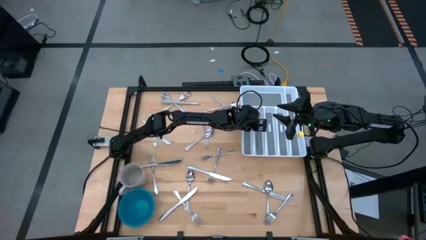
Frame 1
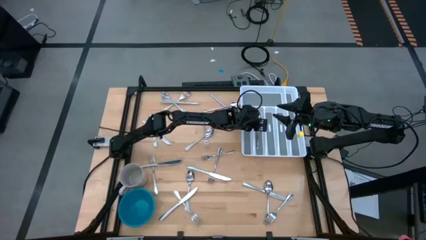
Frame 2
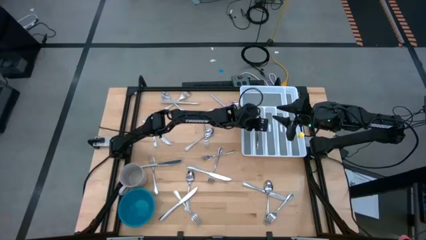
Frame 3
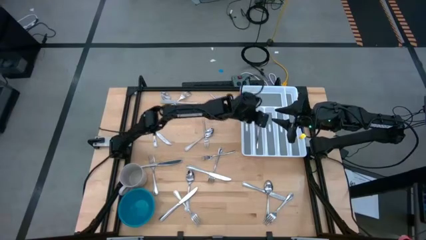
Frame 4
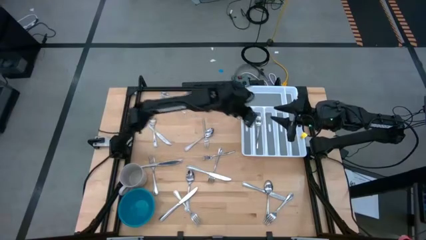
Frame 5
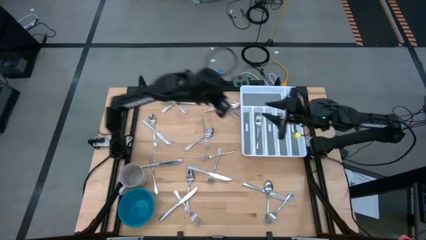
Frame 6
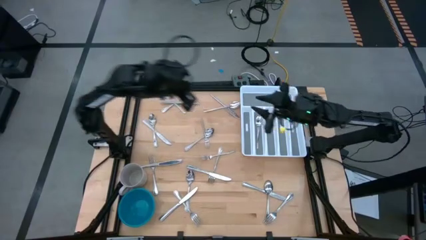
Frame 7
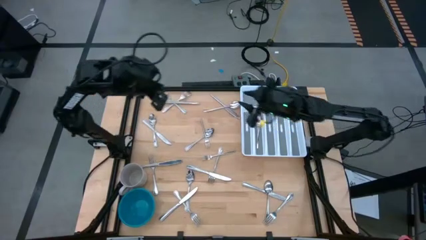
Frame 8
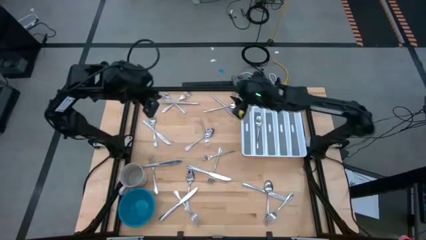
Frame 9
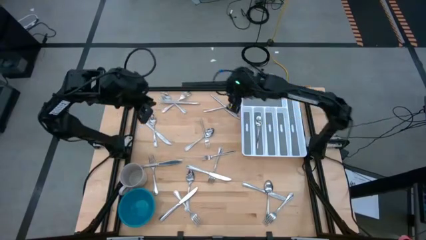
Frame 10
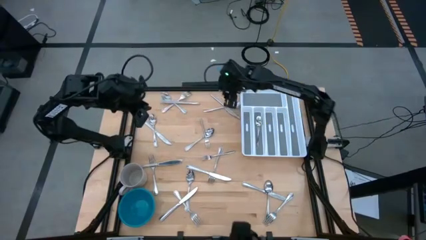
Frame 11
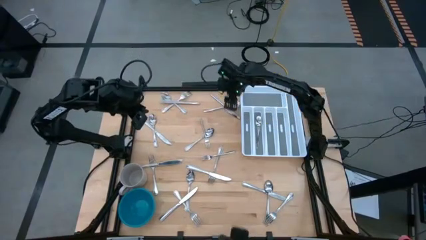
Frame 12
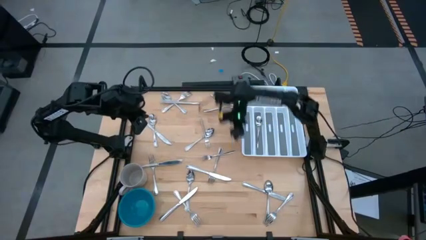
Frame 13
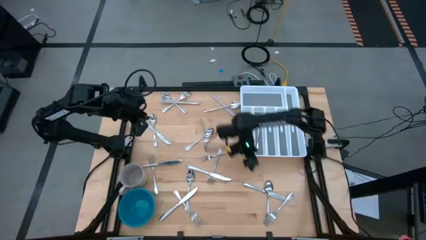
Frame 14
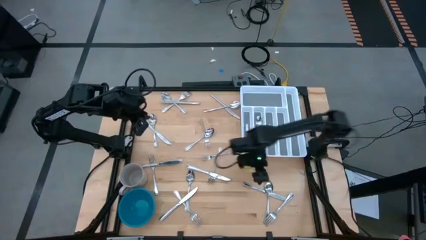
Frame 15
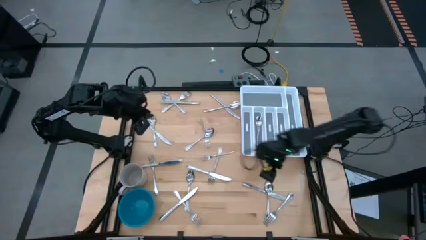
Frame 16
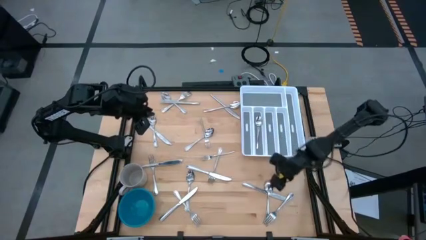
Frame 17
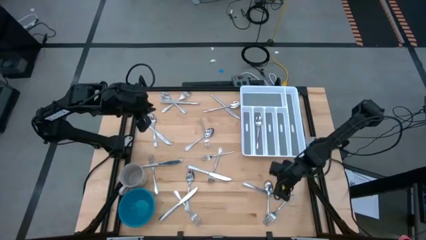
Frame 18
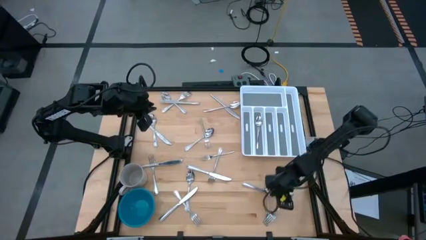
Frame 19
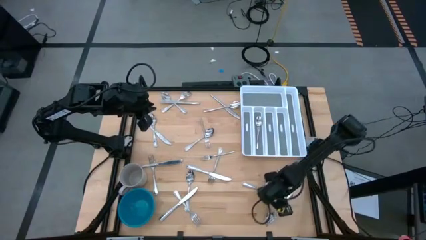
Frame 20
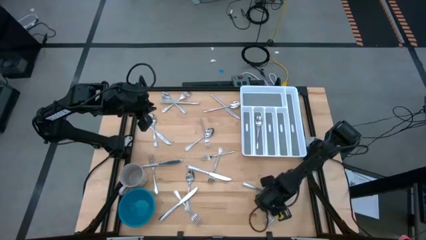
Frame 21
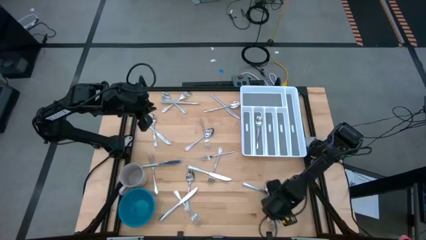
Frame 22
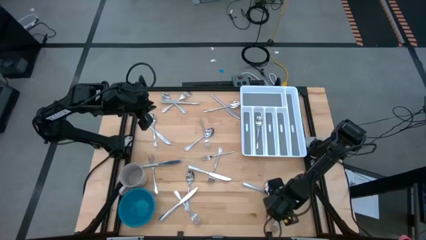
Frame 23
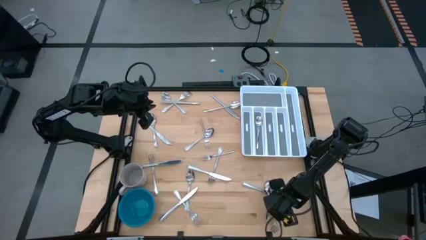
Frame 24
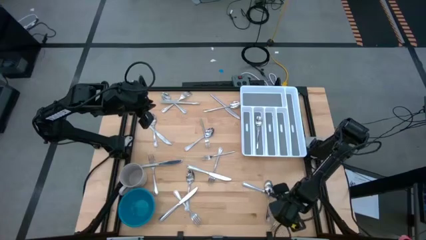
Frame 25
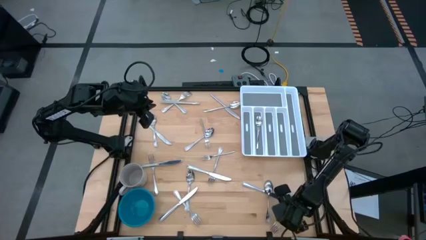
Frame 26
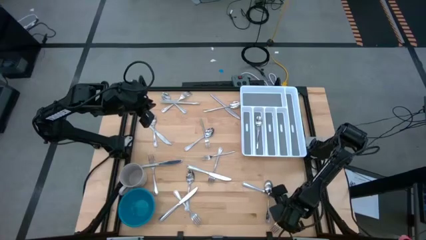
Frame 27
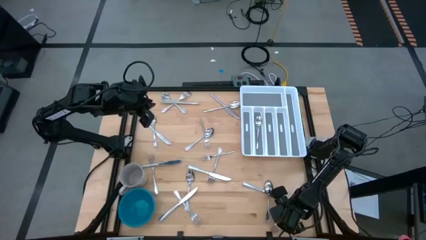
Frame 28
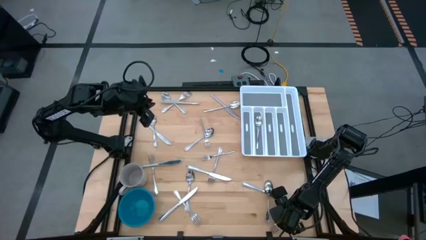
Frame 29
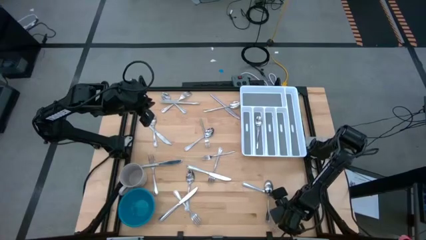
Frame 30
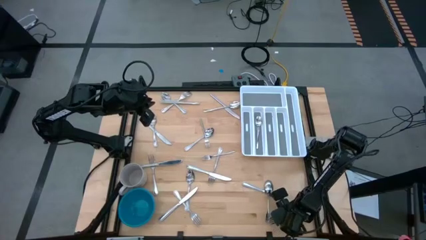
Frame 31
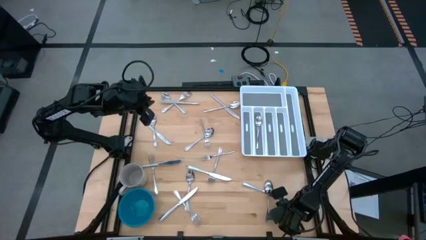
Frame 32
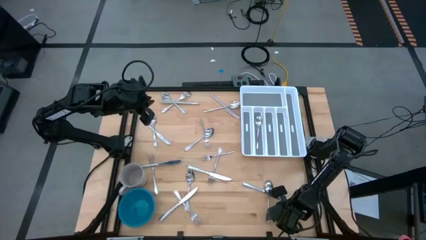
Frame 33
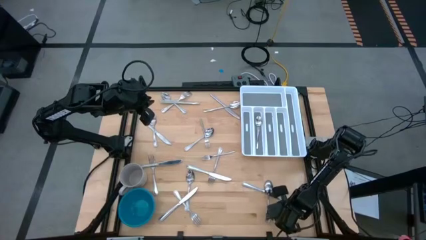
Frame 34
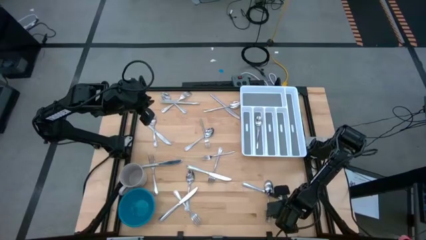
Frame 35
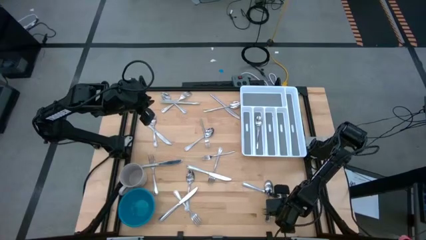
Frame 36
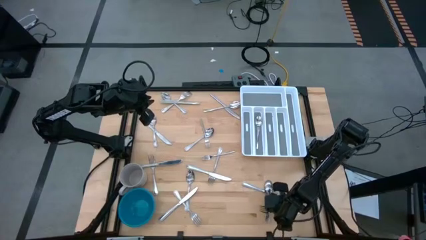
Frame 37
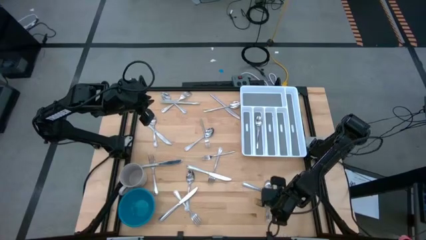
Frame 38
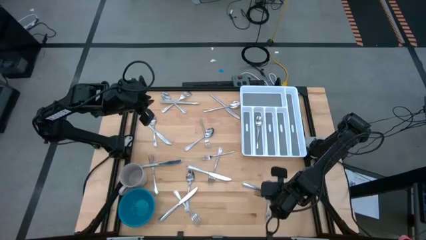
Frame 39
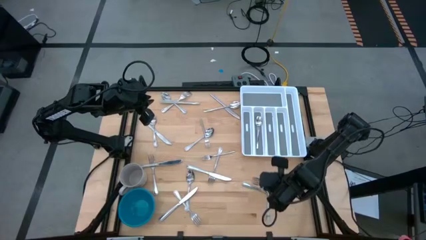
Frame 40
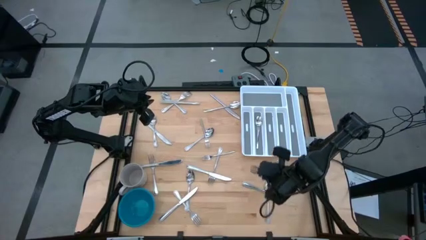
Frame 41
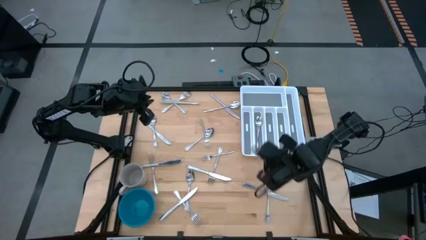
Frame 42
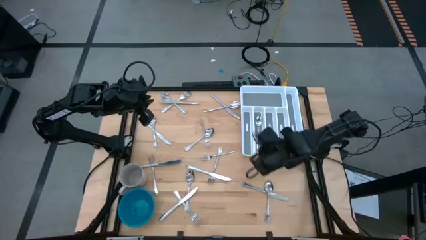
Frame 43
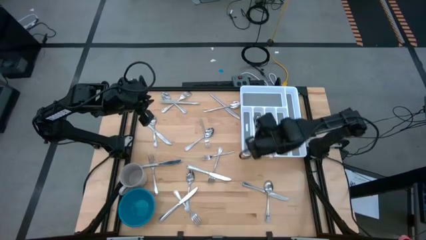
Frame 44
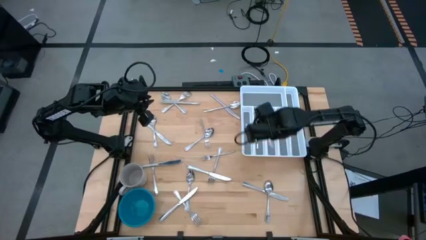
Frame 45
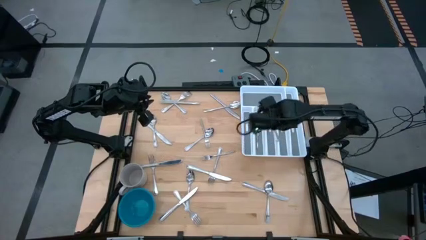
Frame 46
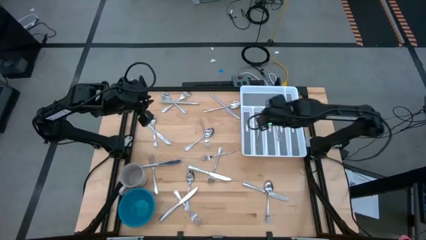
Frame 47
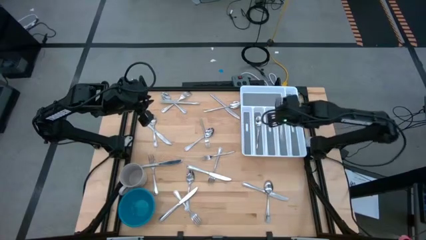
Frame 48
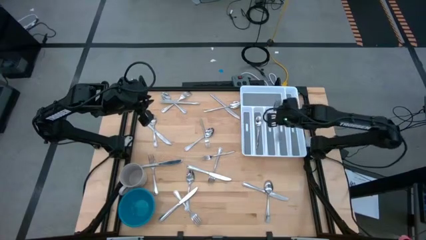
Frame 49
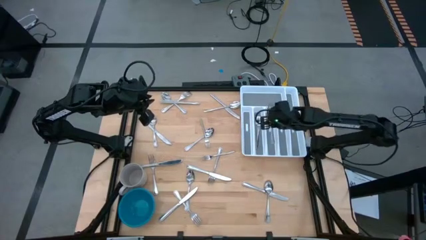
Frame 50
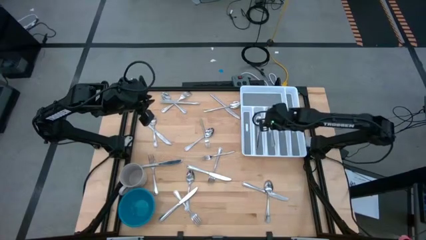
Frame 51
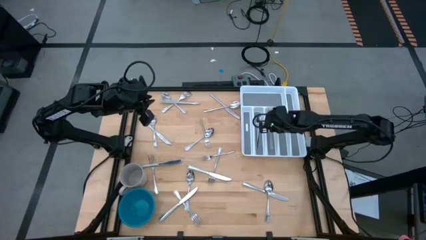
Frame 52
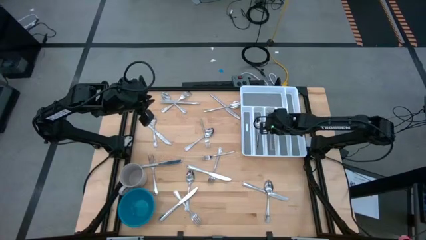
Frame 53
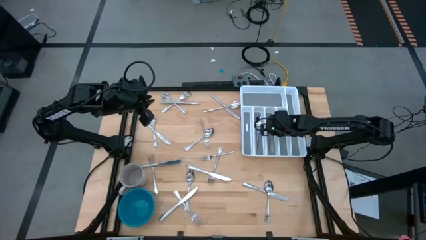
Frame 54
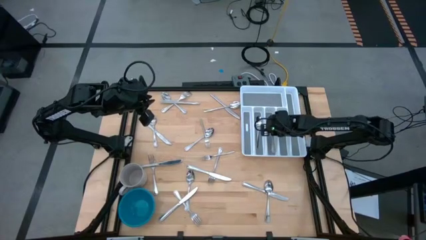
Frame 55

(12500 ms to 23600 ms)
Task: Sort silverware
Put the fork into the silverware tray
